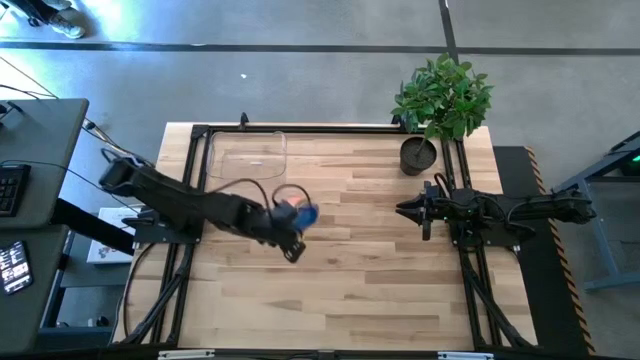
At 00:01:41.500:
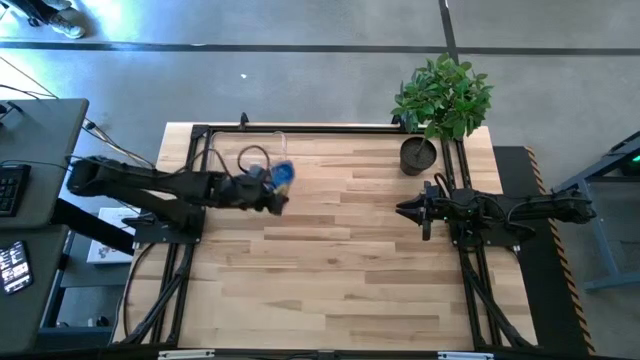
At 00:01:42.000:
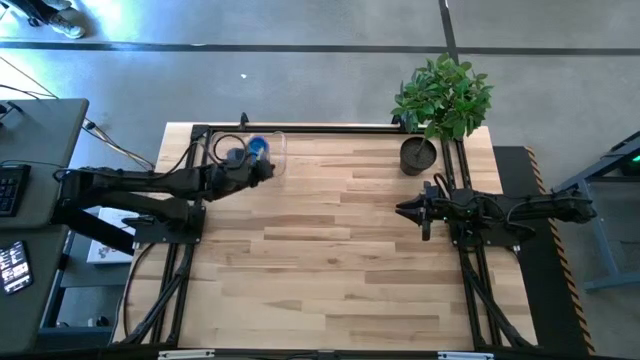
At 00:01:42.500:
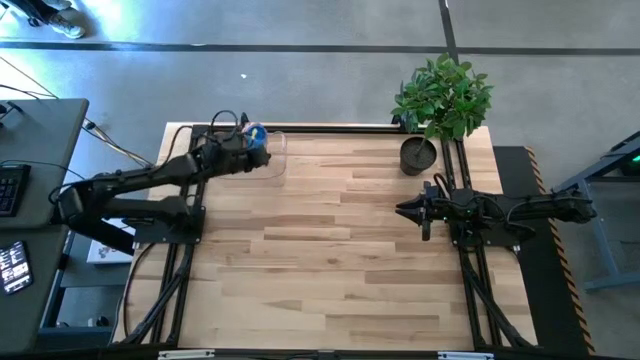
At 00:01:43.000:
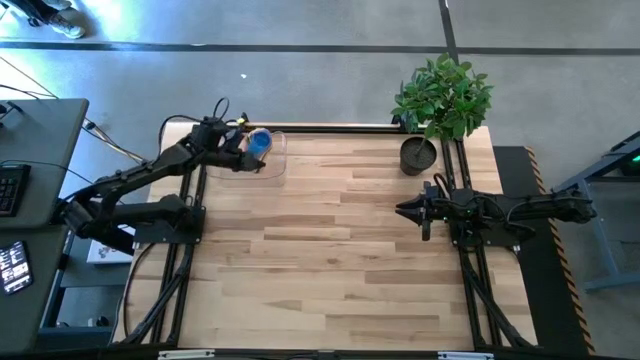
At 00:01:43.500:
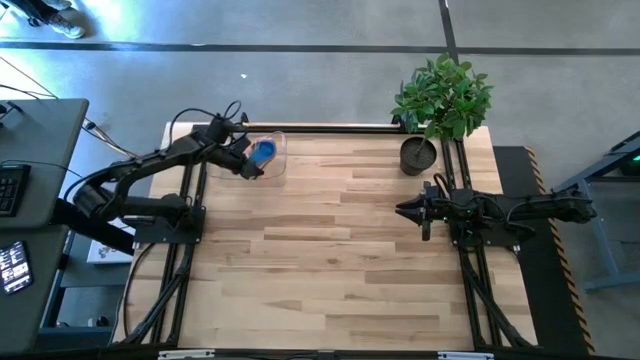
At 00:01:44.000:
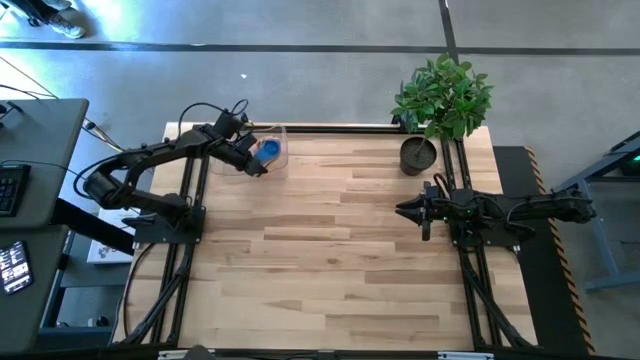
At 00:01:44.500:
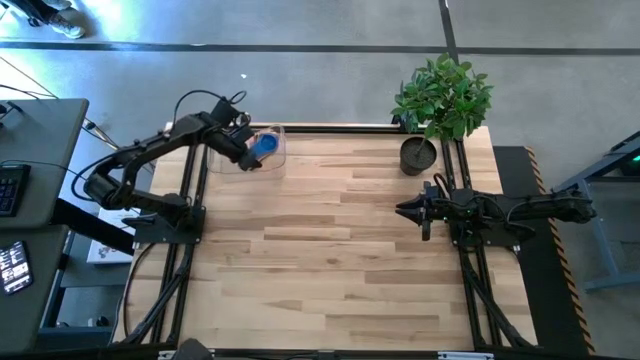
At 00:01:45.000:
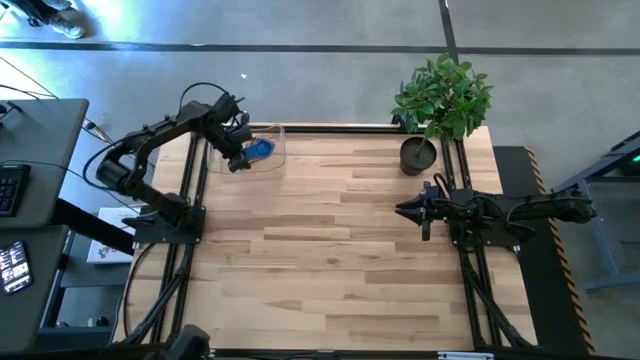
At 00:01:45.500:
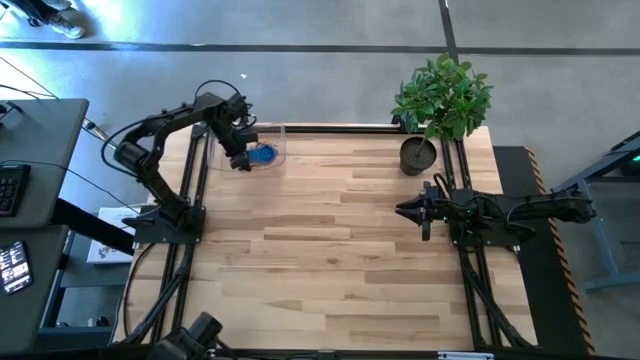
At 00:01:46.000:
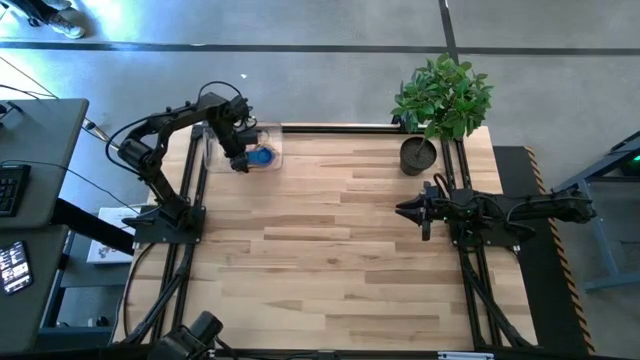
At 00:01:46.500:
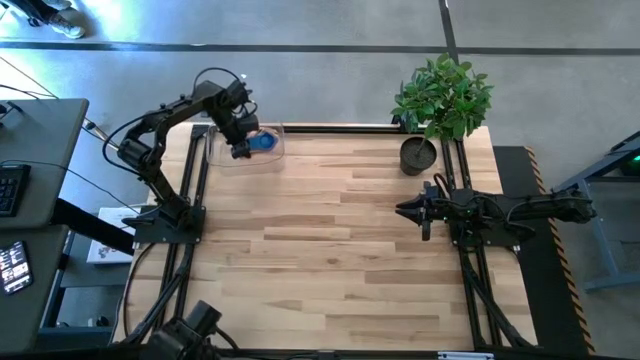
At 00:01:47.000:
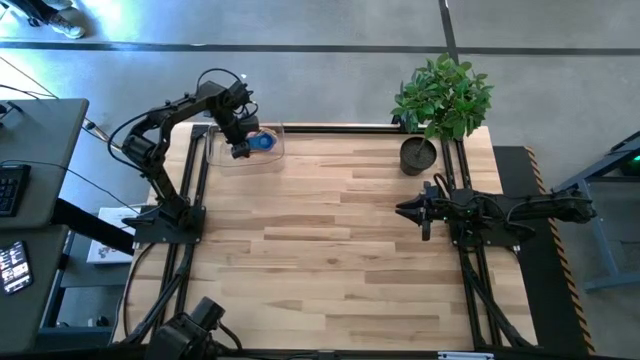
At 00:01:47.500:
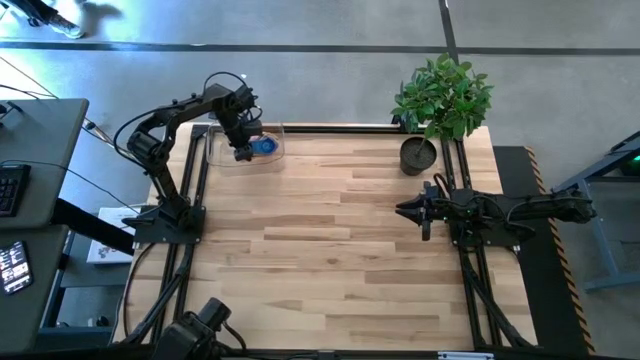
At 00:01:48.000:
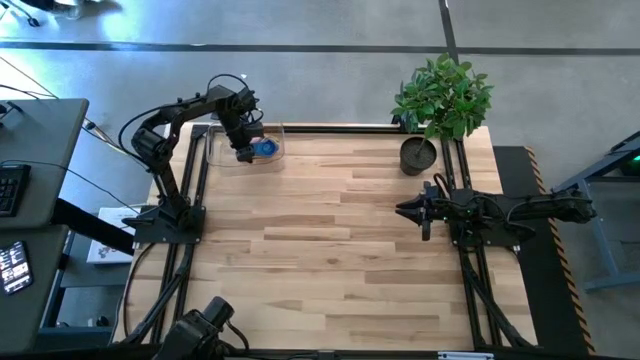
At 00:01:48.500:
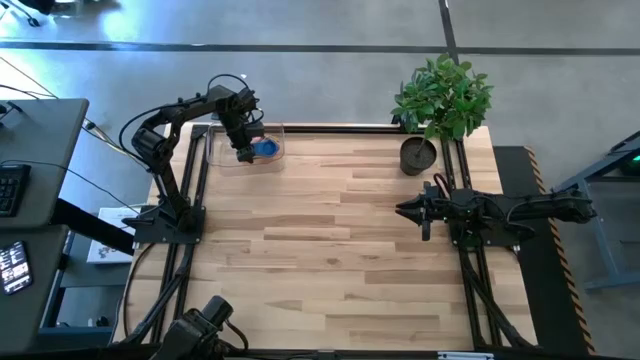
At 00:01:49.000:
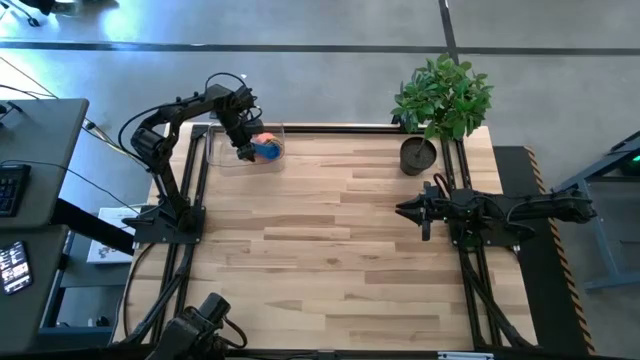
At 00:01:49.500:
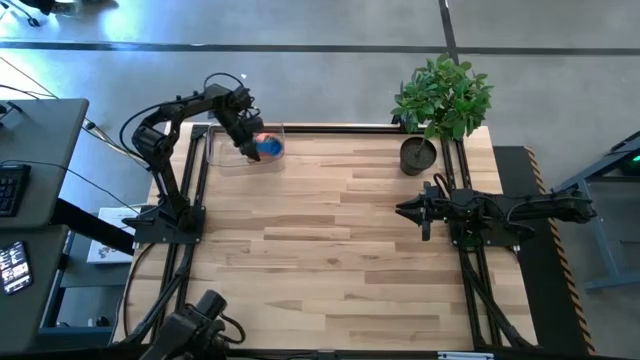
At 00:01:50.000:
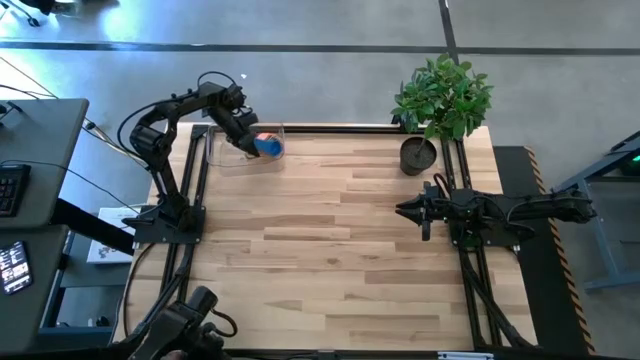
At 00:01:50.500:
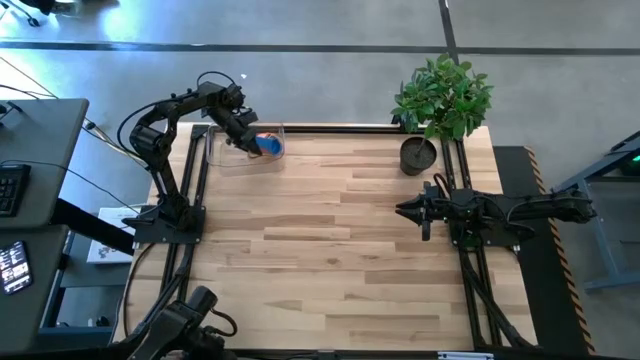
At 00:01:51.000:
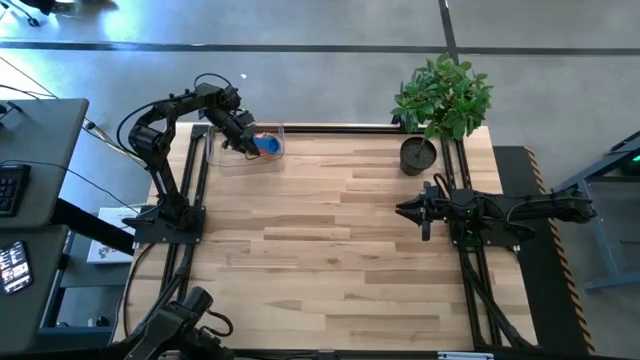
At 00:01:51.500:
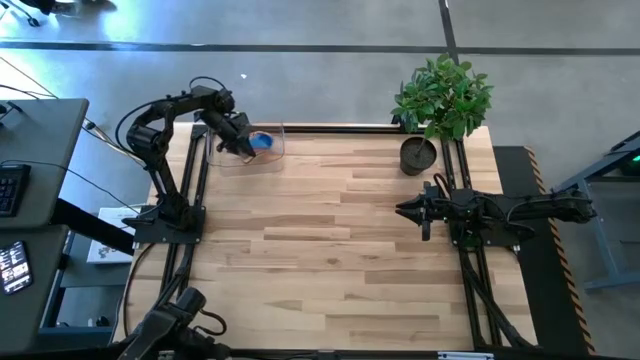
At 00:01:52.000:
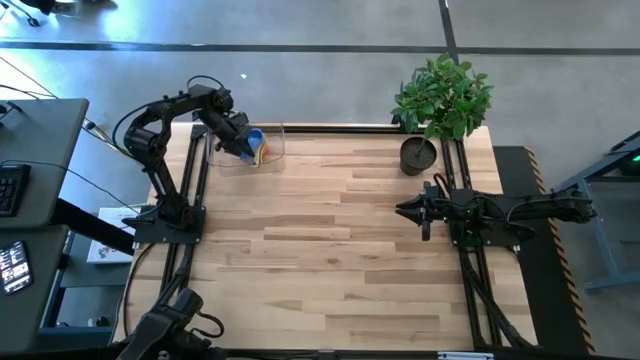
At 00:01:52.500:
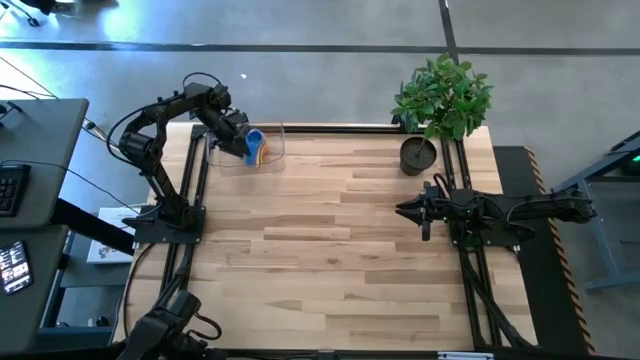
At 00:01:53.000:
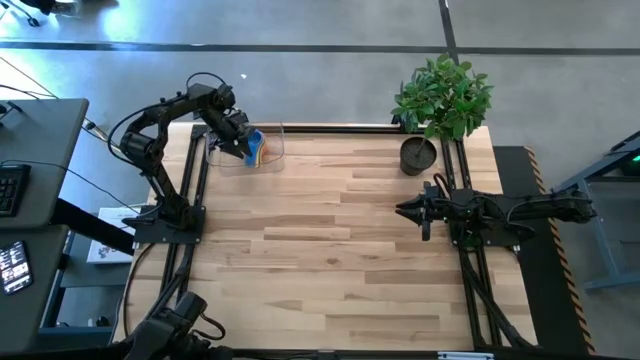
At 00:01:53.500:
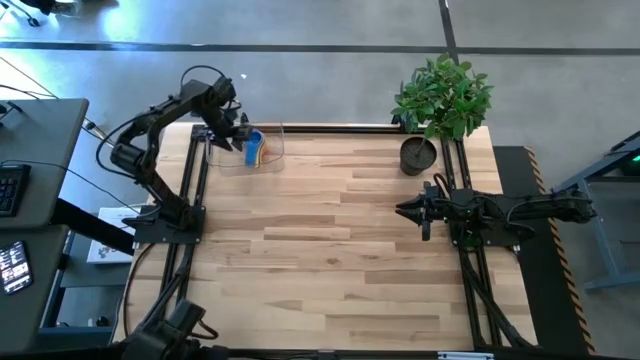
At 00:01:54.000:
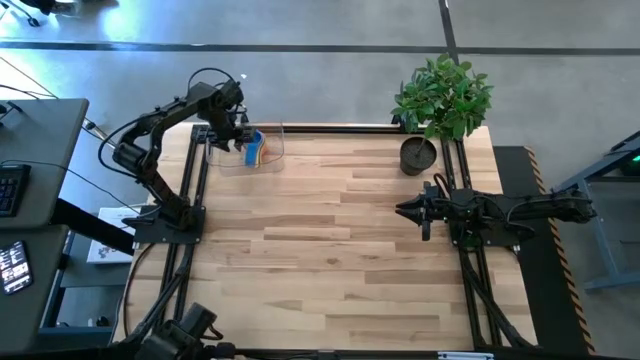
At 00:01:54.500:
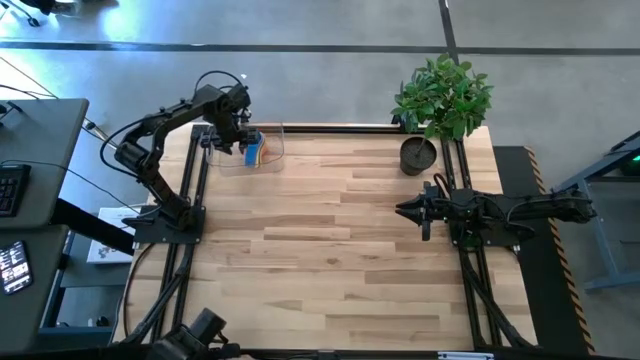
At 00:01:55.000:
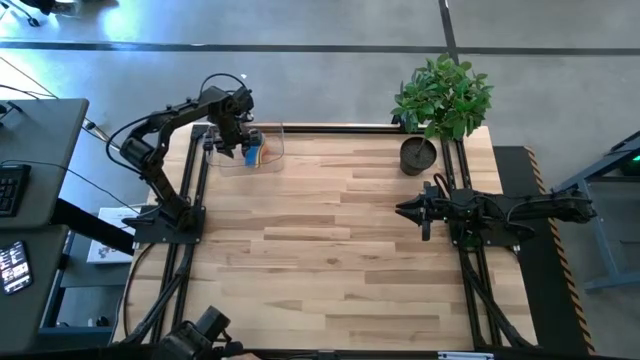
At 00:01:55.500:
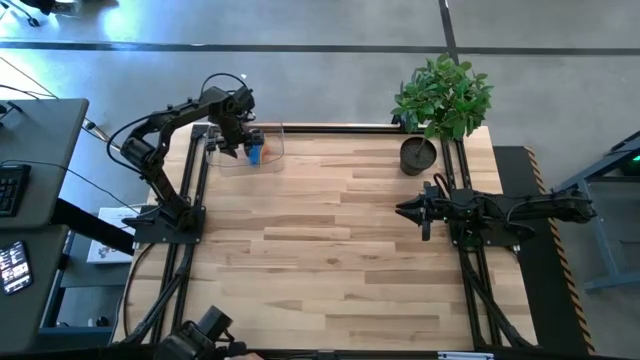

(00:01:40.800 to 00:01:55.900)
Task: Nest measuring cups in basket
Put the nested measuring cups into the transparent bin

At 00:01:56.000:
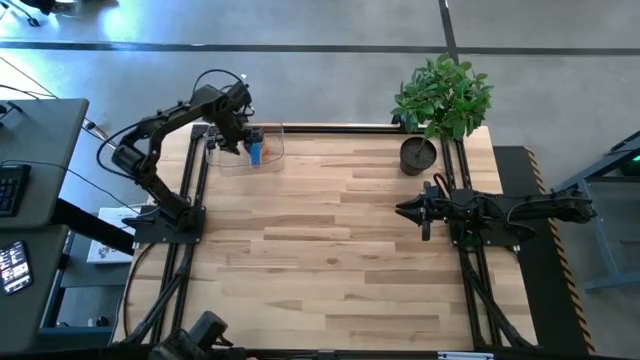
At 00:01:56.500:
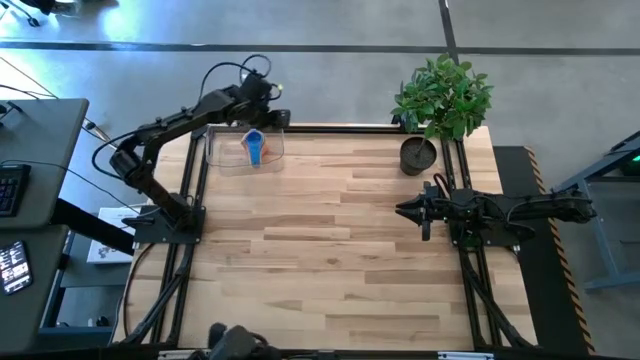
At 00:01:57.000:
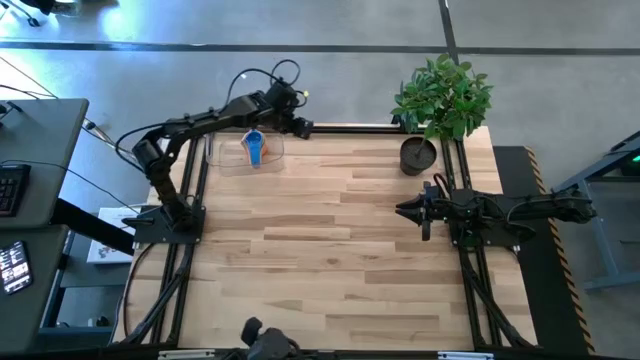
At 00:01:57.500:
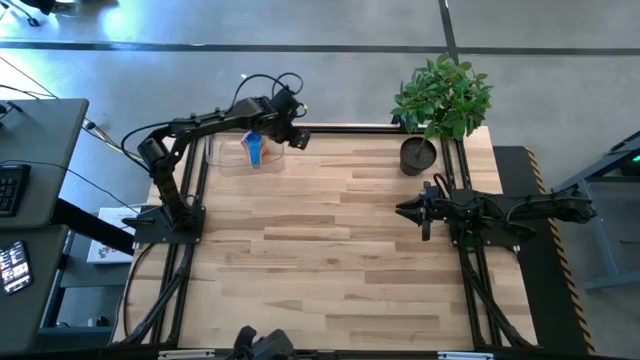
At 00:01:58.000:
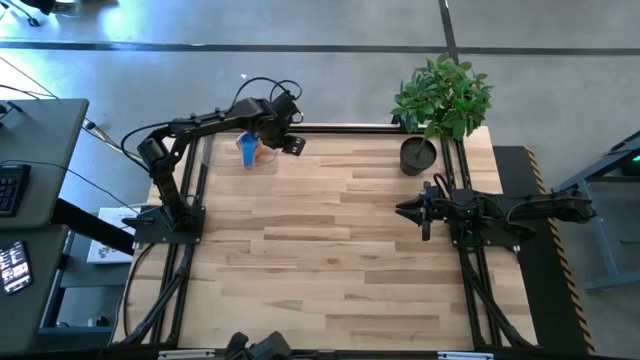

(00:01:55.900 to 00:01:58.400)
Adjust the transparent bin

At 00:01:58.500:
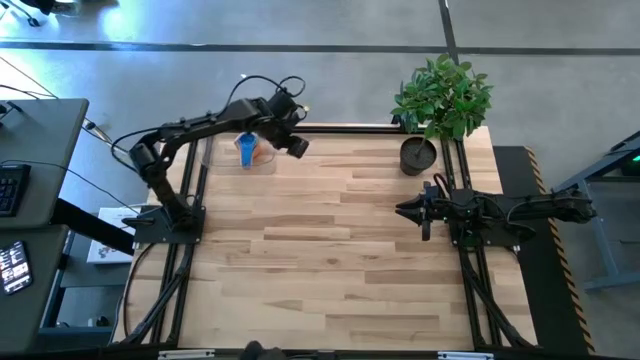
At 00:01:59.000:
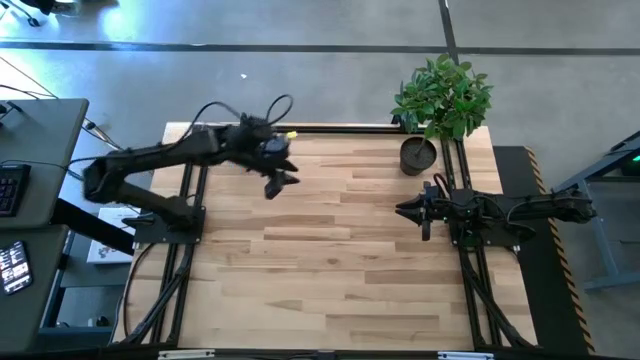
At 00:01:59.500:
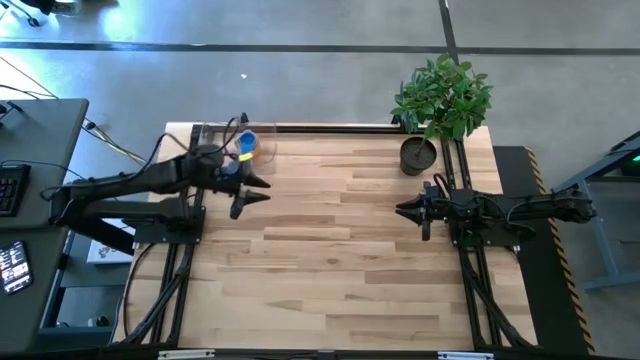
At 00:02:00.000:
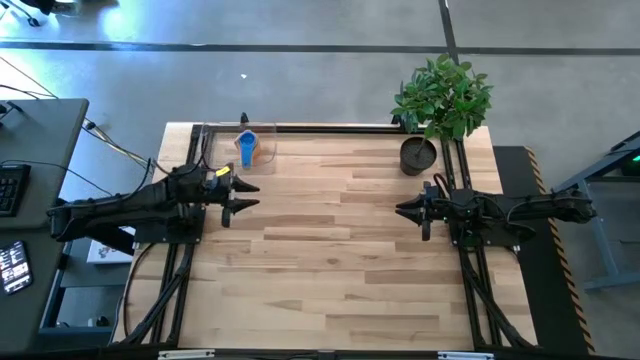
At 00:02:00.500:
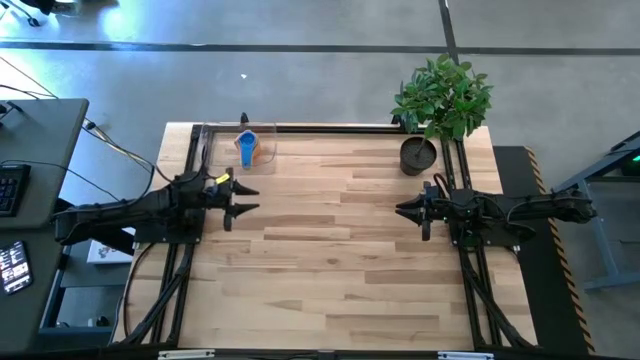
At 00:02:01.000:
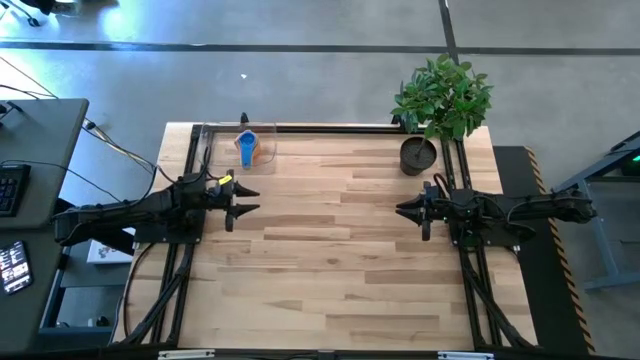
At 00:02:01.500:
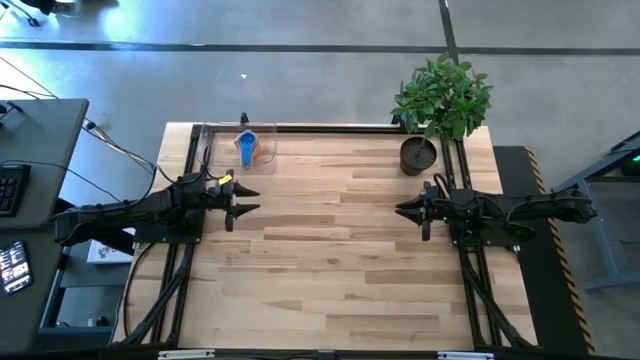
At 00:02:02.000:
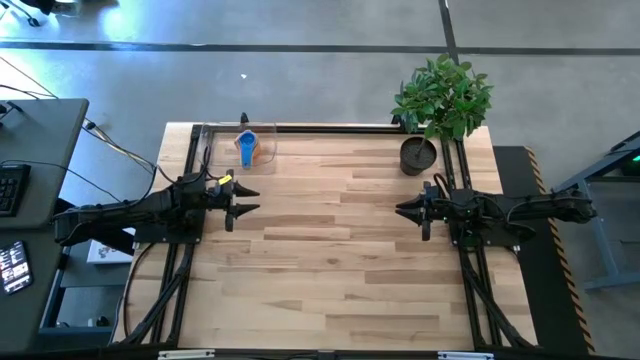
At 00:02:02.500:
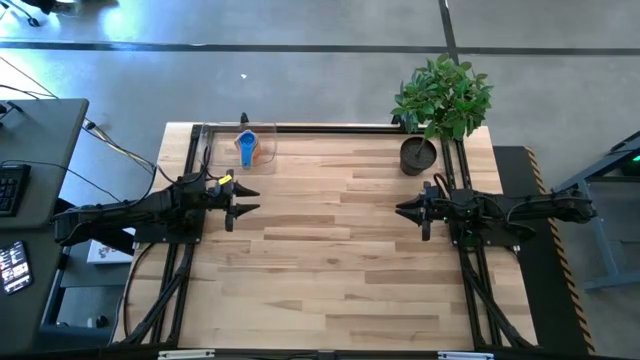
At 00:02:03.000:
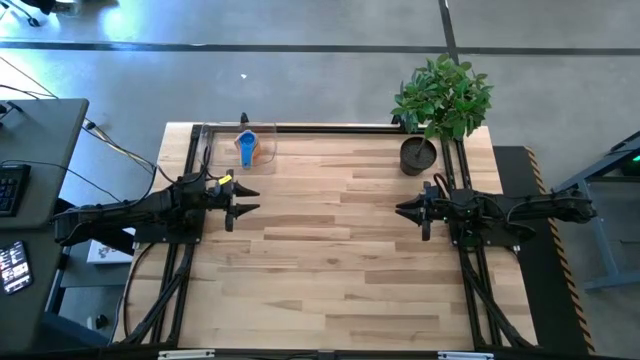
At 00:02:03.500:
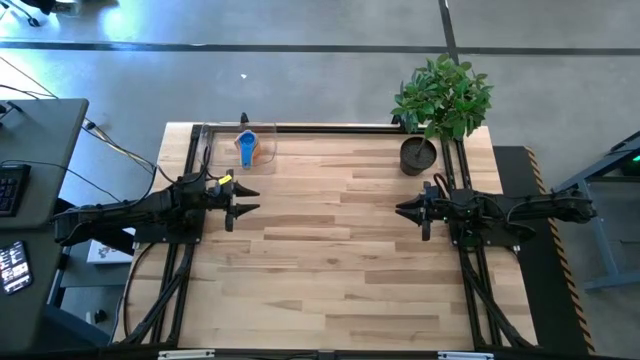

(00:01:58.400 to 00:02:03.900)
Return to Home Position
